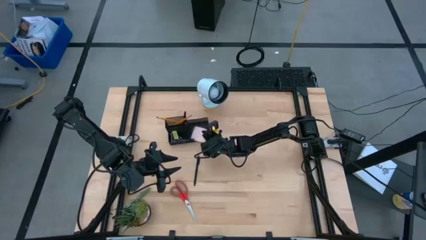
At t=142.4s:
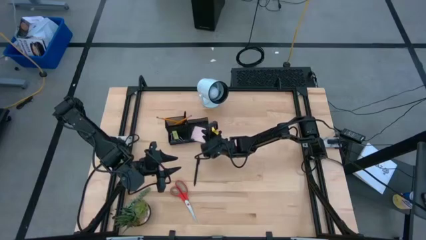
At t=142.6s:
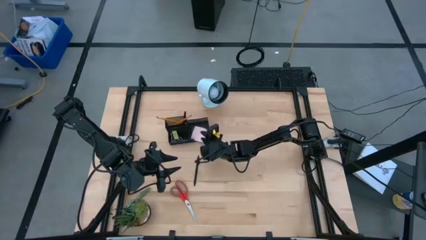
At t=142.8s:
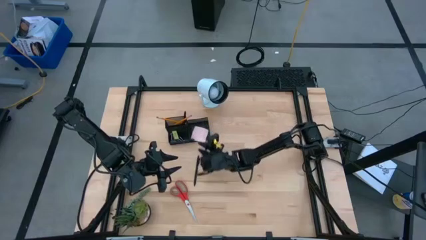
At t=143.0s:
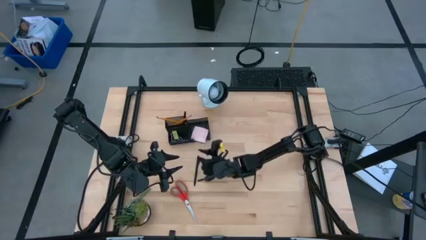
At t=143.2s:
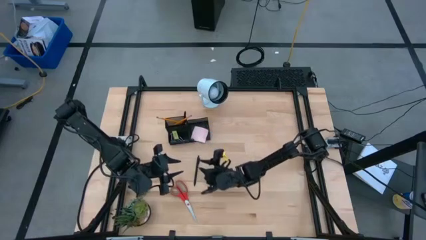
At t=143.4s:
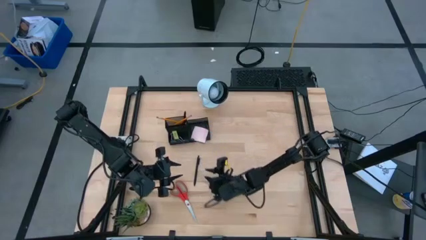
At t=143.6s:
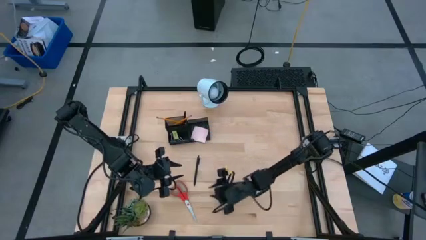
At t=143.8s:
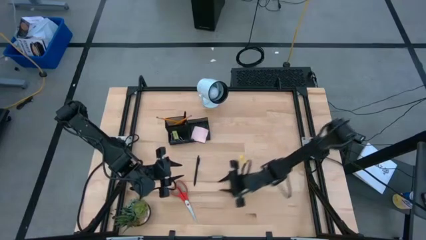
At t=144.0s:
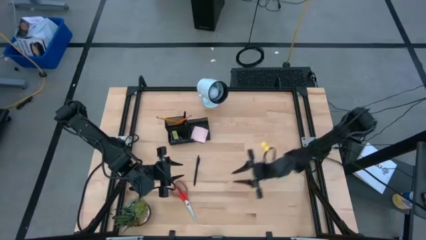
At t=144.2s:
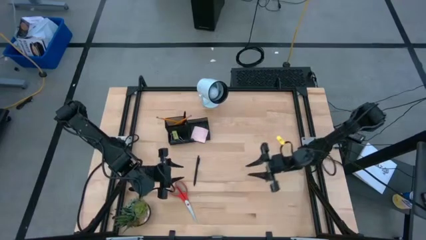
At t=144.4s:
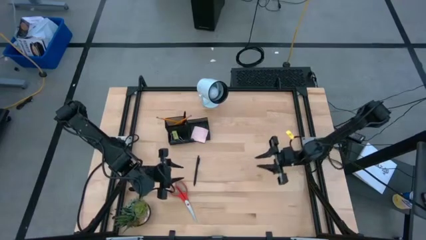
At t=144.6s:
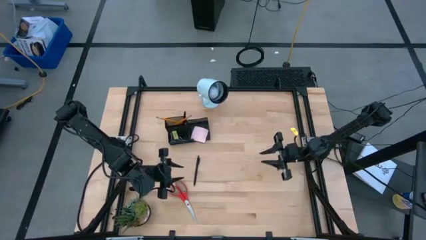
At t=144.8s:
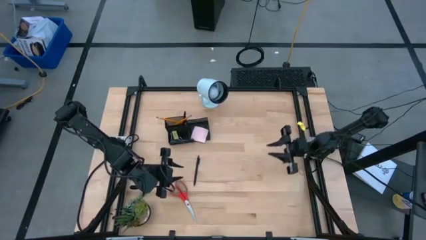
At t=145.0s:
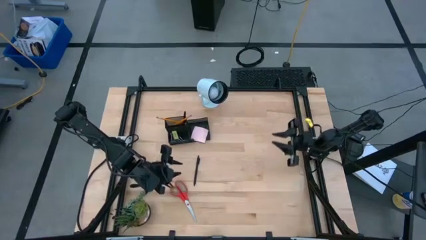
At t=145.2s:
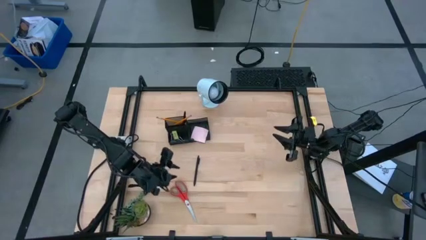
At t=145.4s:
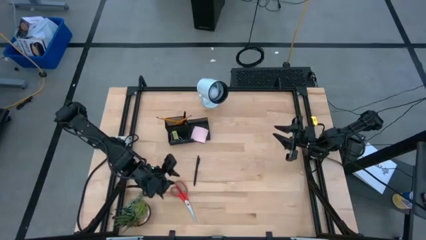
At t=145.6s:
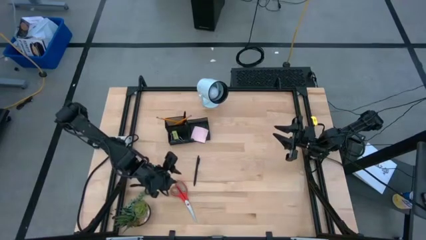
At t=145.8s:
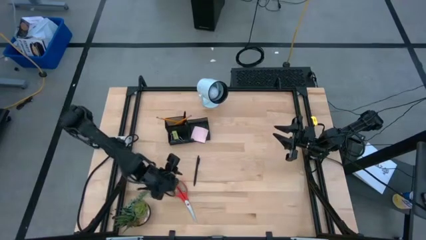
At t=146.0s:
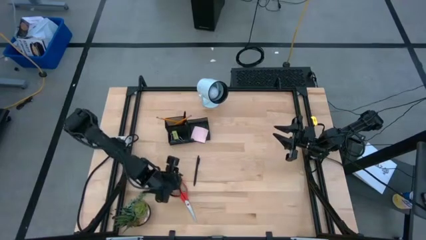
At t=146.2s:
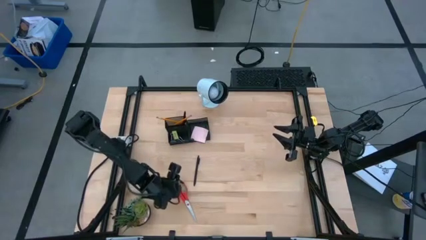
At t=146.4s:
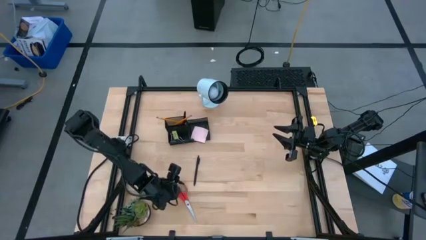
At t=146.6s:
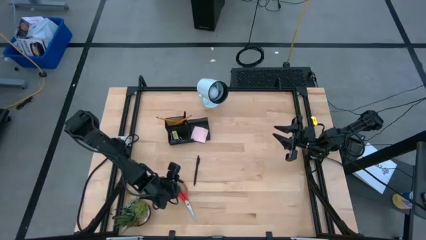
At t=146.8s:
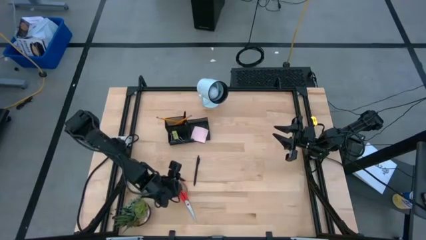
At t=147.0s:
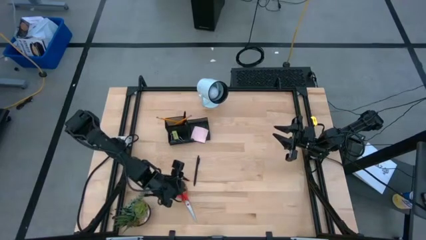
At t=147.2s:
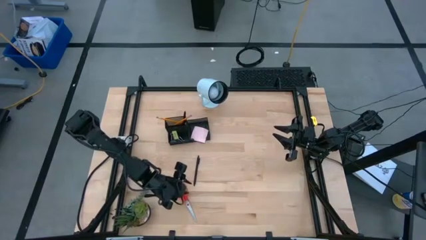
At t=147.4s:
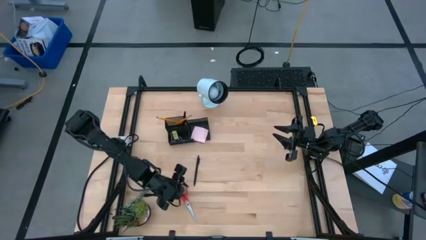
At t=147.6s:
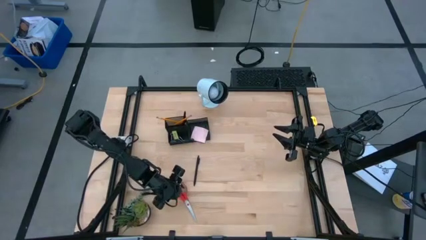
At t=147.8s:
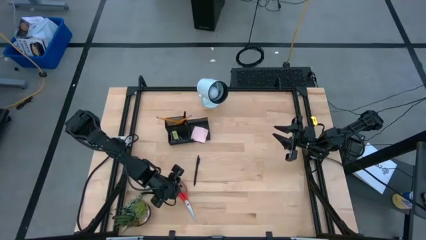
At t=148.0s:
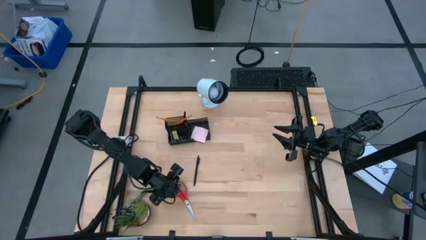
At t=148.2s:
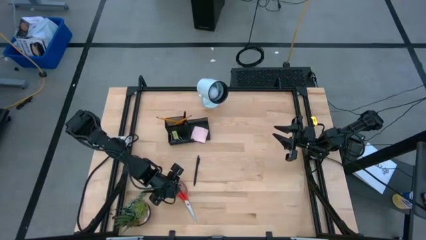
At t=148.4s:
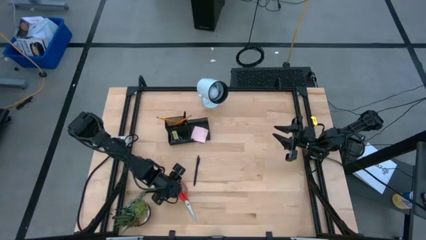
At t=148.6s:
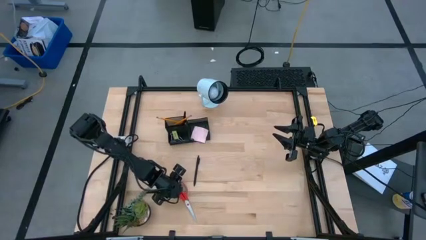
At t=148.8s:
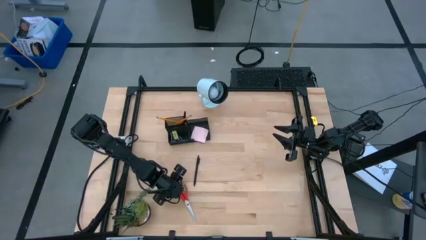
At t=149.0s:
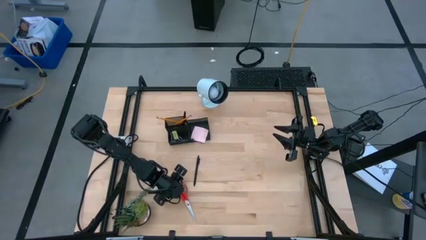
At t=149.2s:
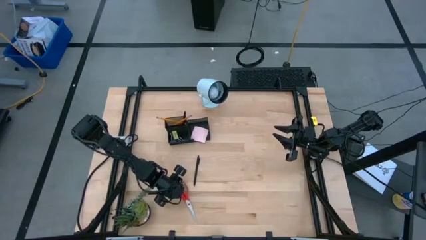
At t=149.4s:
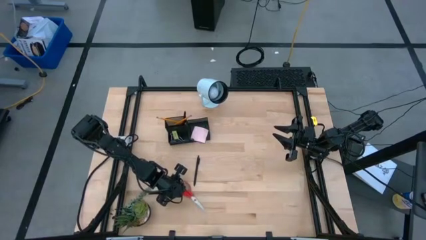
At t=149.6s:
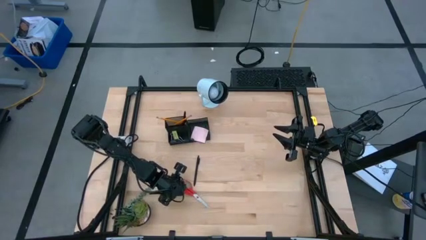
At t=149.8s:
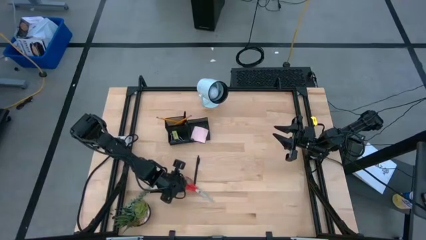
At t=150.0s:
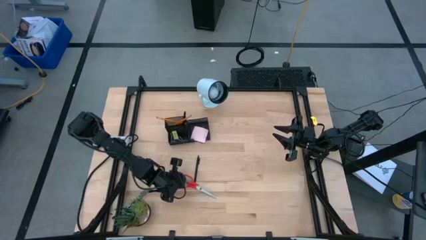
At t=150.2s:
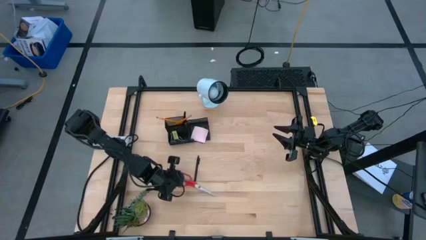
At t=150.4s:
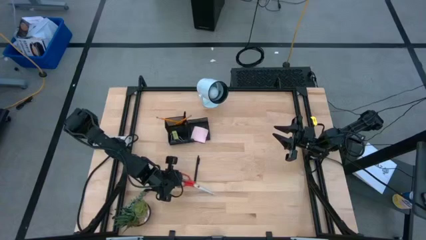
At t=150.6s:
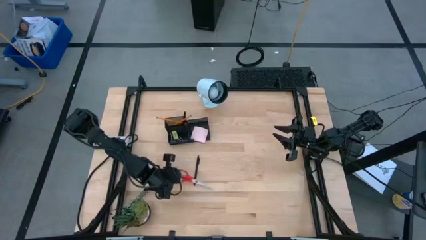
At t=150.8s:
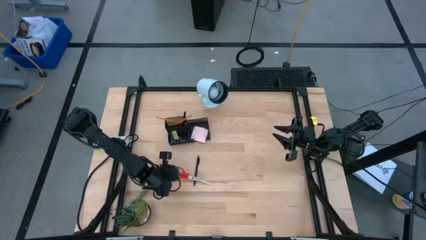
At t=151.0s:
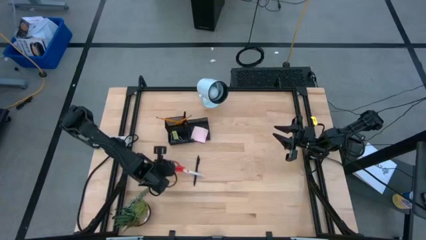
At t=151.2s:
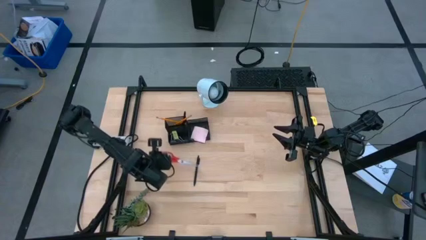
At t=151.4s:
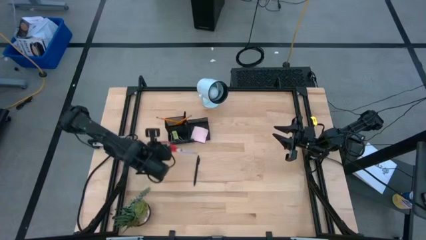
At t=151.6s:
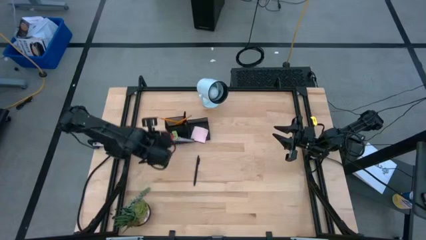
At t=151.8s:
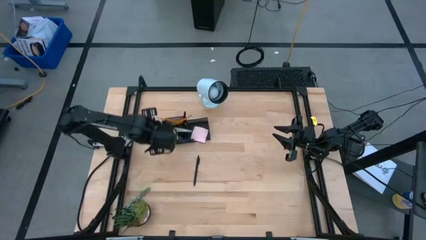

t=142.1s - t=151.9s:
Task: Pick and place office supplies into organizer
Put the red scissors into the black desk organizer

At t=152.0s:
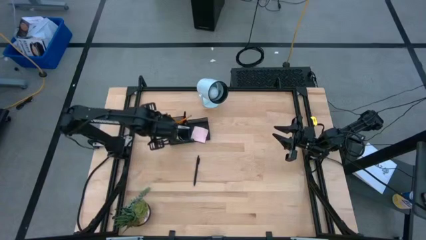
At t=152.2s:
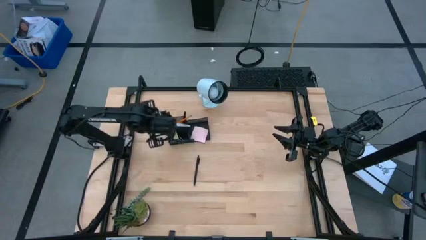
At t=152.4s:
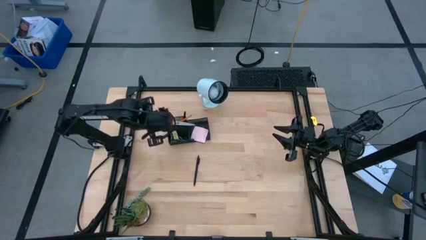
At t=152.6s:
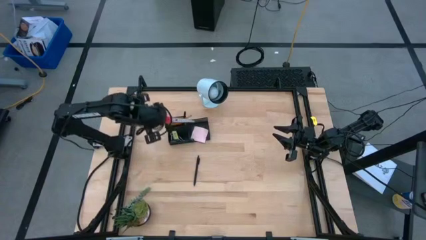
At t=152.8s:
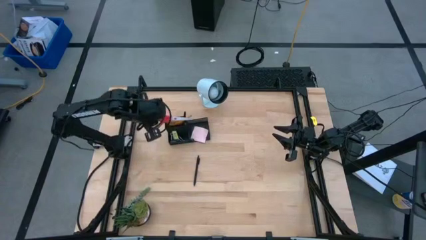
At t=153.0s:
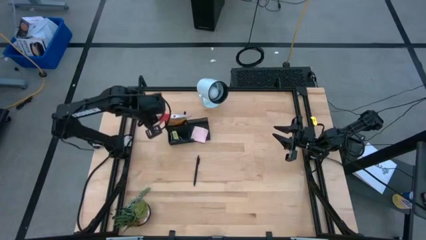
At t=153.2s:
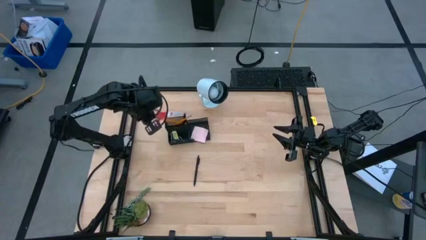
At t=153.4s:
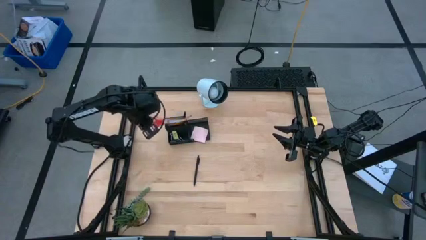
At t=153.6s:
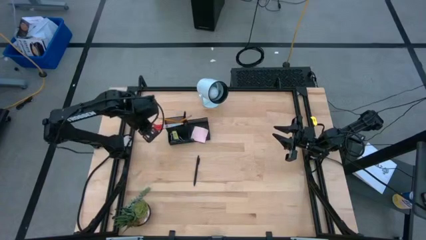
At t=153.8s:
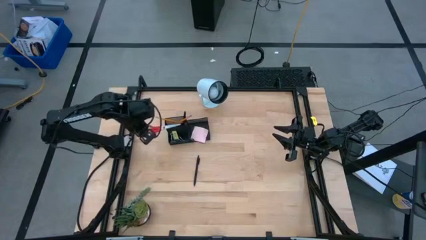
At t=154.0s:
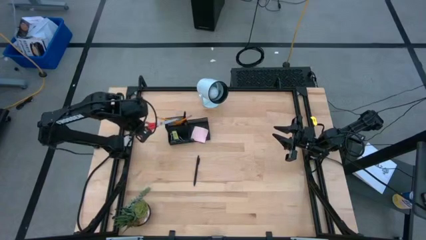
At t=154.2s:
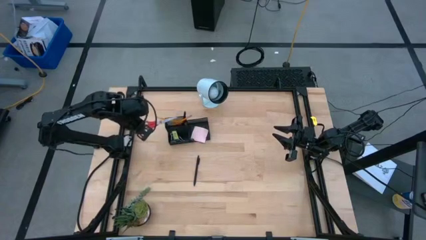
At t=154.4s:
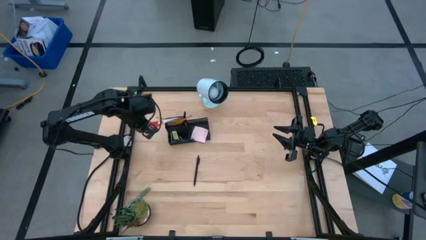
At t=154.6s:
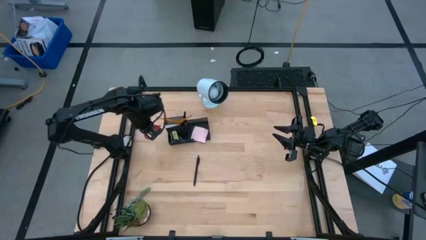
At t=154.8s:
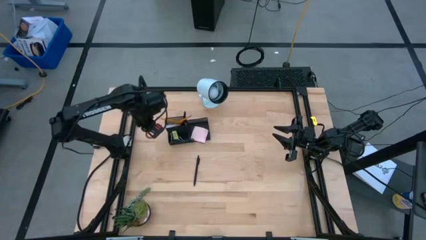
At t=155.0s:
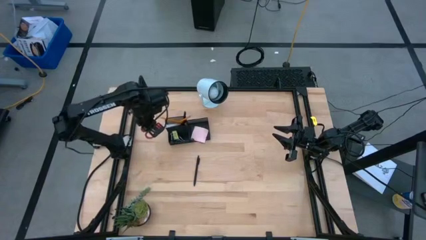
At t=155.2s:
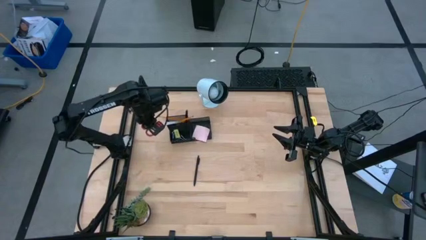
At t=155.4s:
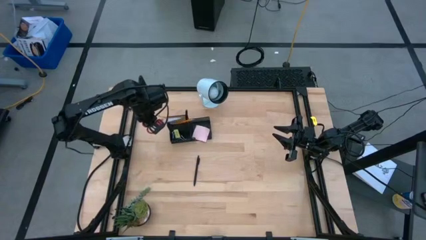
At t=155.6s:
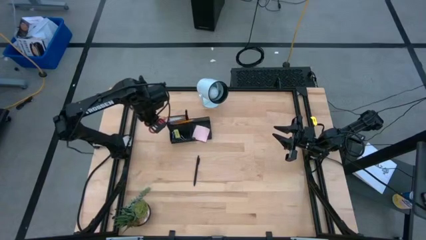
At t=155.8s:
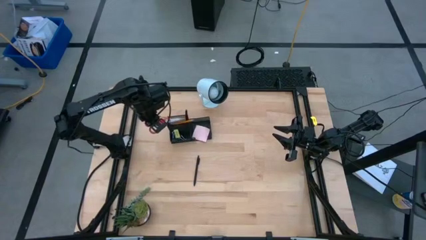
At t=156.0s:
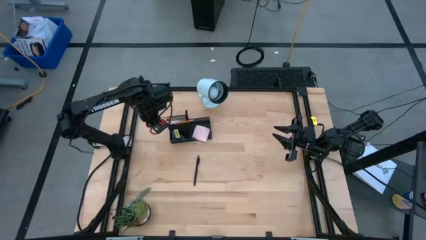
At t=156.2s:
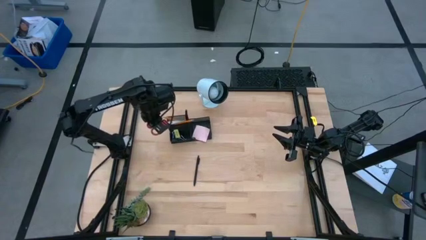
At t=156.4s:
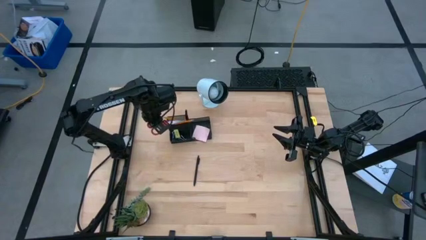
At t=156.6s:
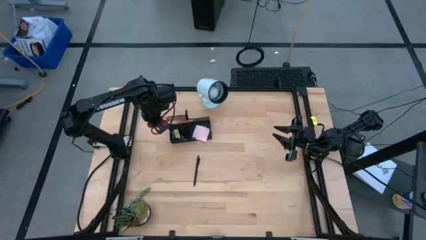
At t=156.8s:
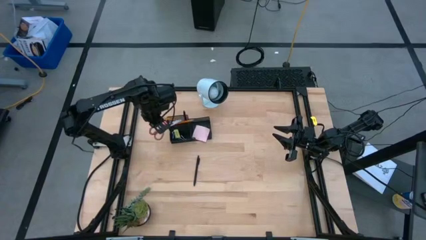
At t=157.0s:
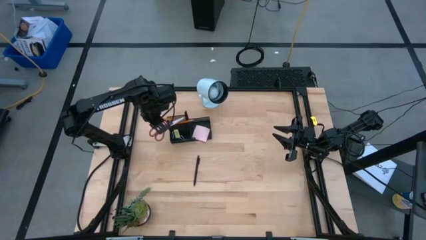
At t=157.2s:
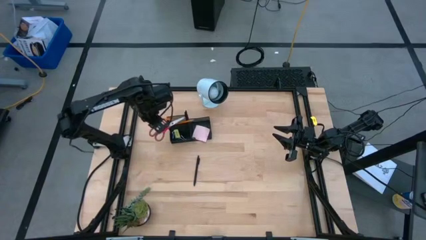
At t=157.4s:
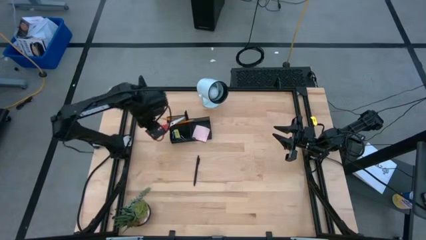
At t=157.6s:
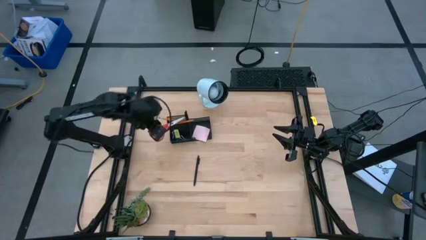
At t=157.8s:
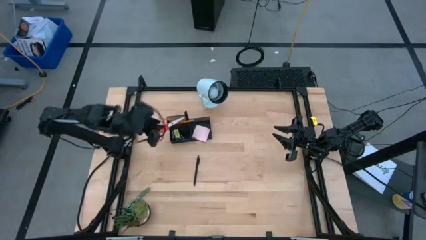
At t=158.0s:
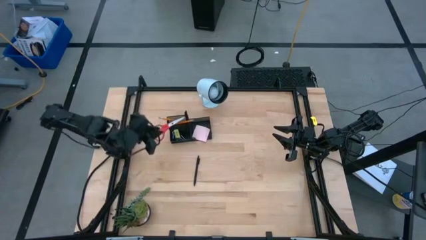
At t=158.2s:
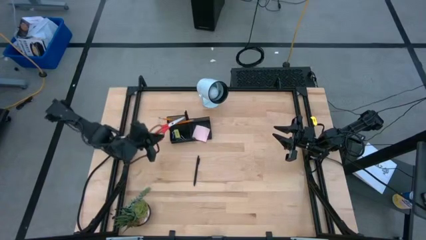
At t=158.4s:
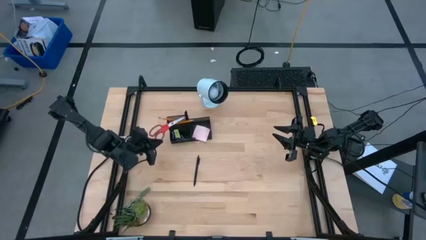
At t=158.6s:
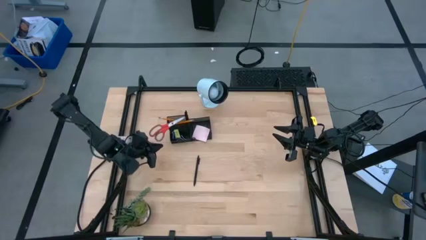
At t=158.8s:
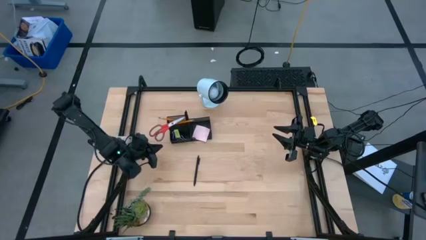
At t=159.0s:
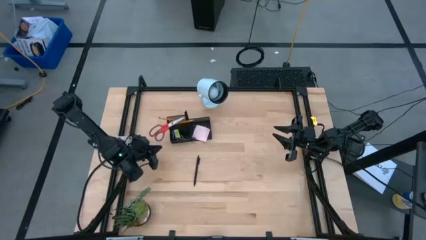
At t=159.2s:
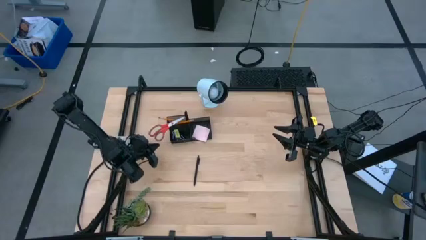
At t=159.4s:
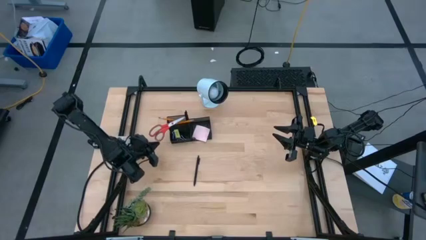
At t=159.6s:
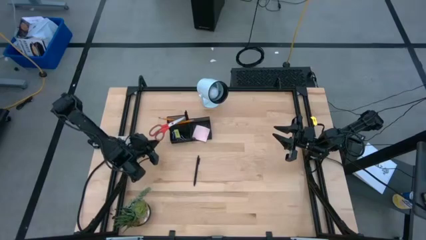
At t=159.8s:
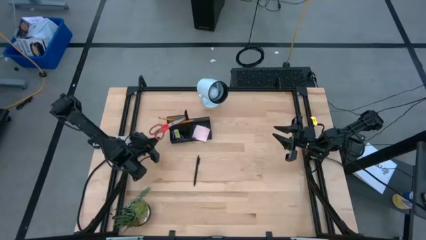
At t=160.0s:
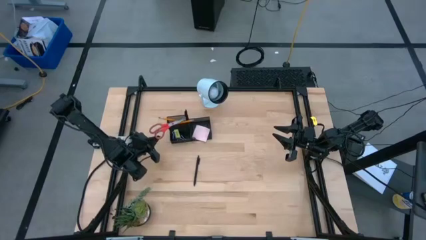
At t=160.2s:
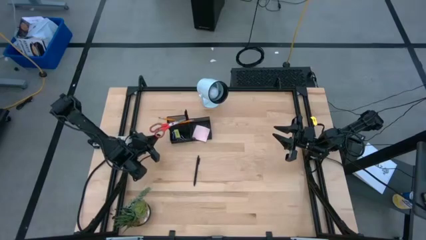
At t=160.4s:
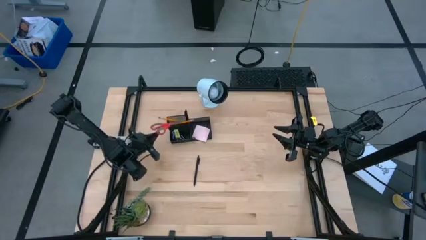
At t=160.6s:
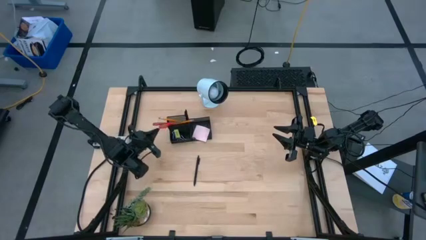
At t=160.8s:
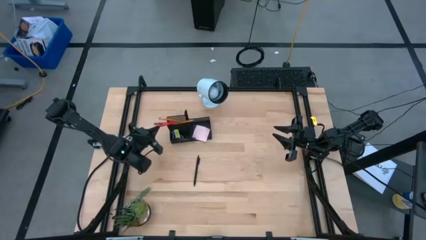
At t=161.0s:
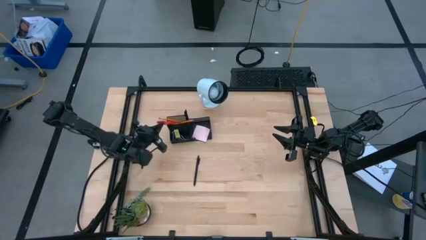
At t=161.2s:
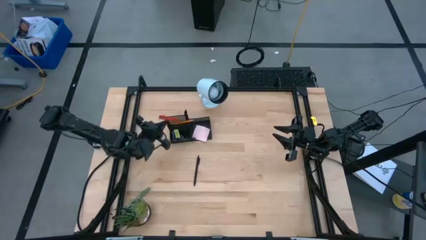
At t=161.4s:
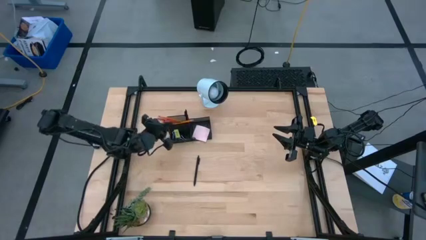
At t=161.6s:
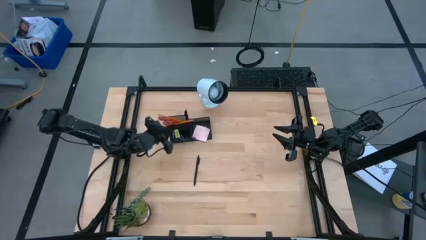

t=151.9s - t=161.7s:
Put the red scissors into the black desk organizer
